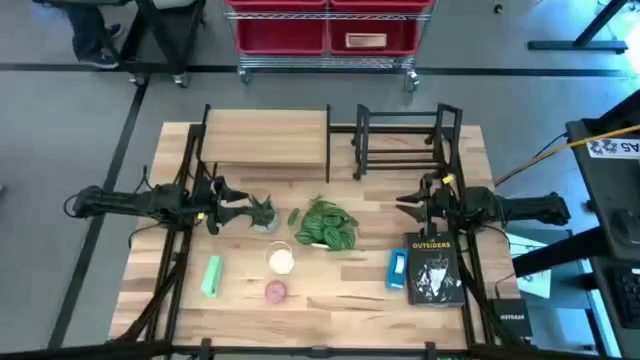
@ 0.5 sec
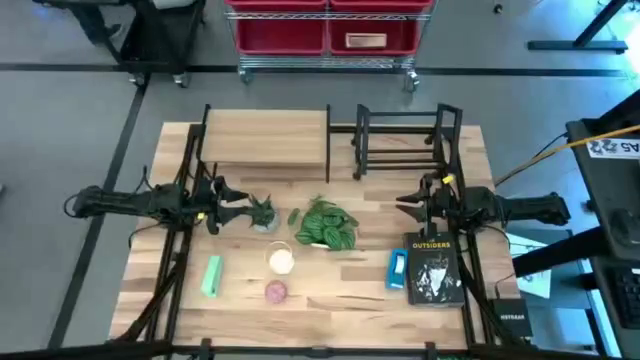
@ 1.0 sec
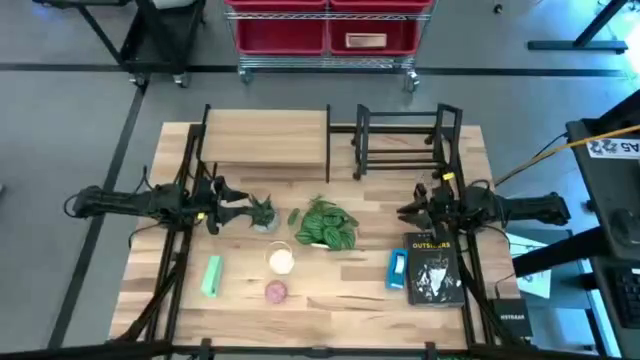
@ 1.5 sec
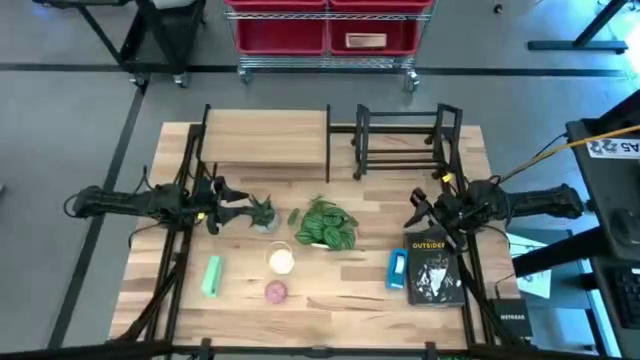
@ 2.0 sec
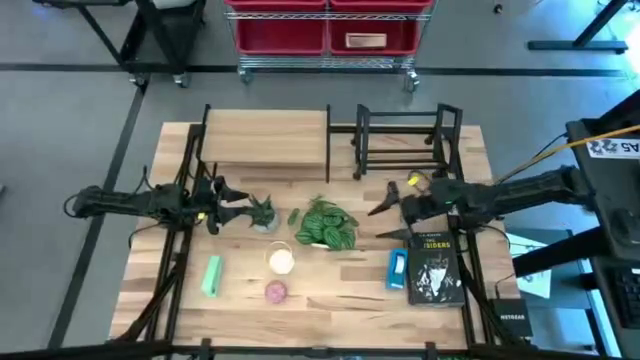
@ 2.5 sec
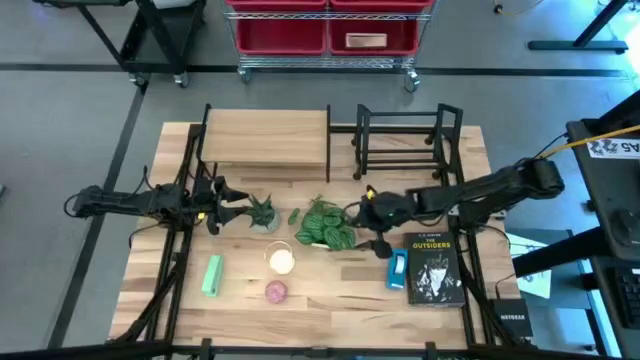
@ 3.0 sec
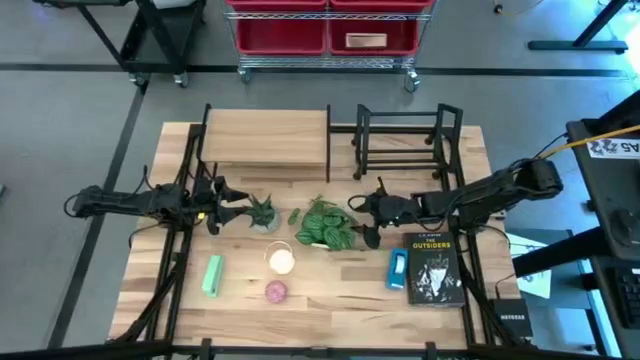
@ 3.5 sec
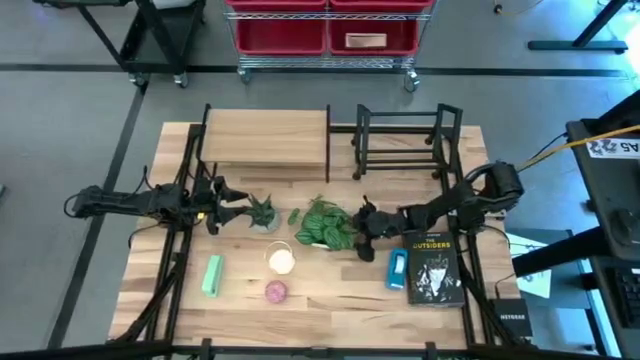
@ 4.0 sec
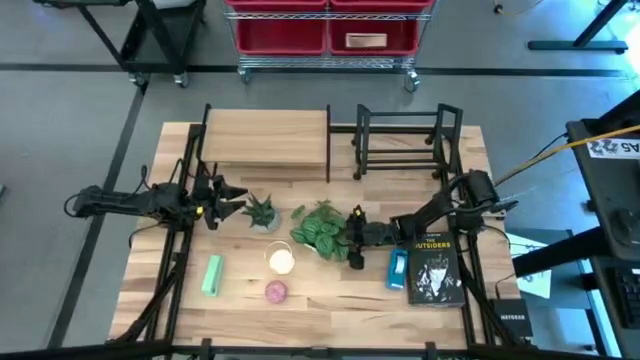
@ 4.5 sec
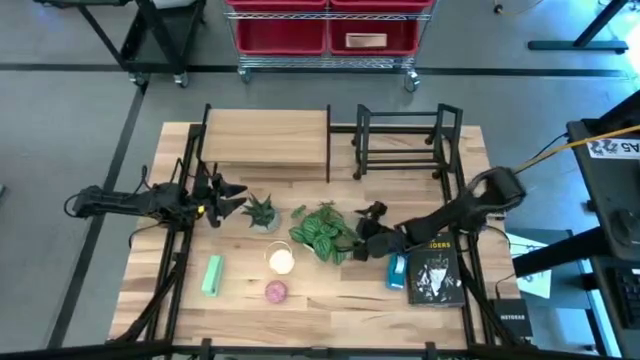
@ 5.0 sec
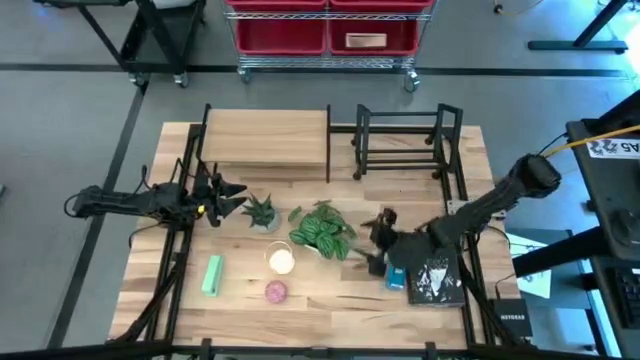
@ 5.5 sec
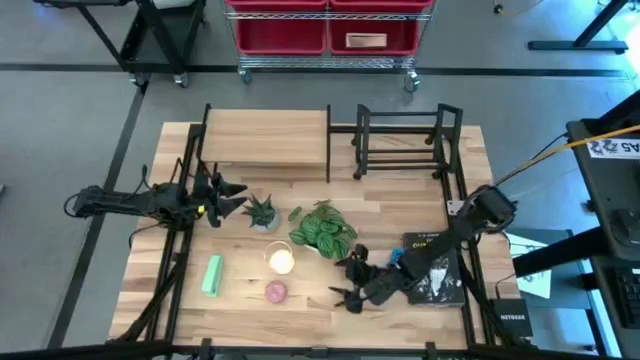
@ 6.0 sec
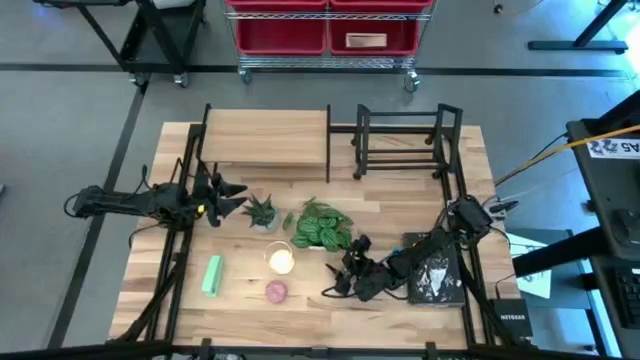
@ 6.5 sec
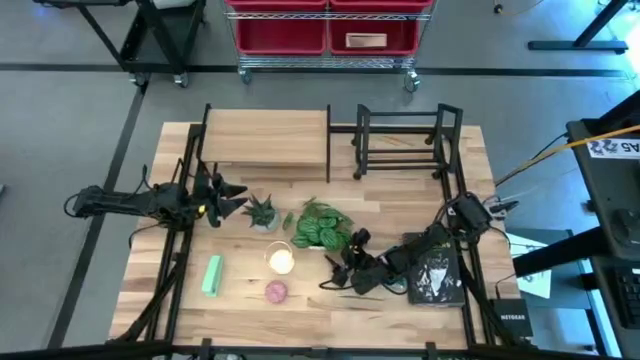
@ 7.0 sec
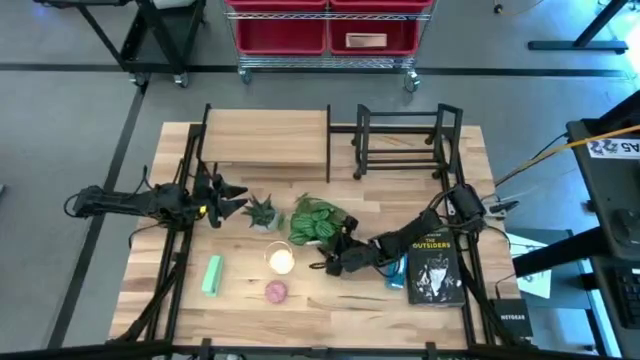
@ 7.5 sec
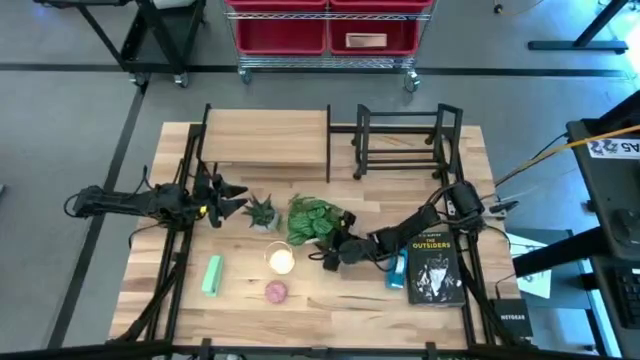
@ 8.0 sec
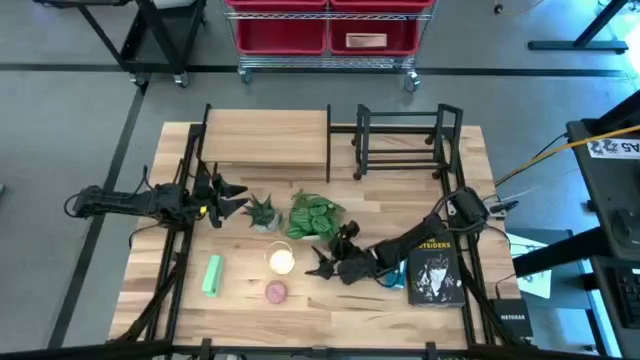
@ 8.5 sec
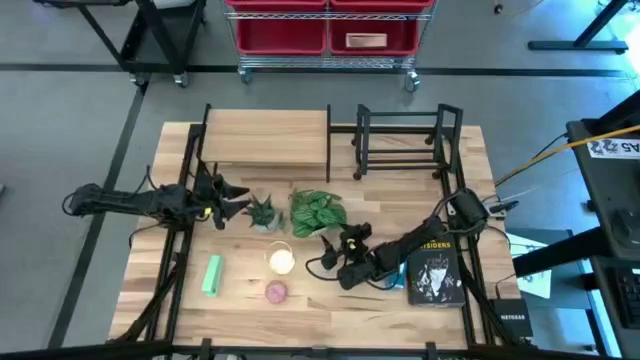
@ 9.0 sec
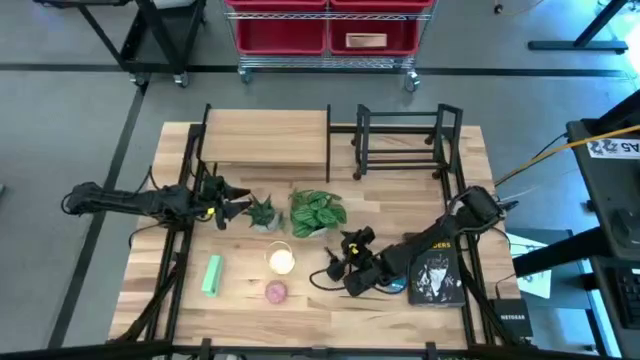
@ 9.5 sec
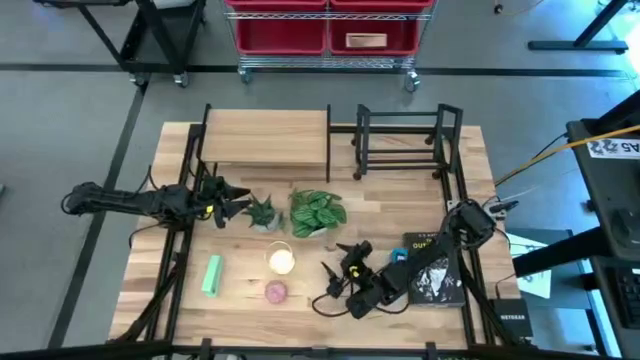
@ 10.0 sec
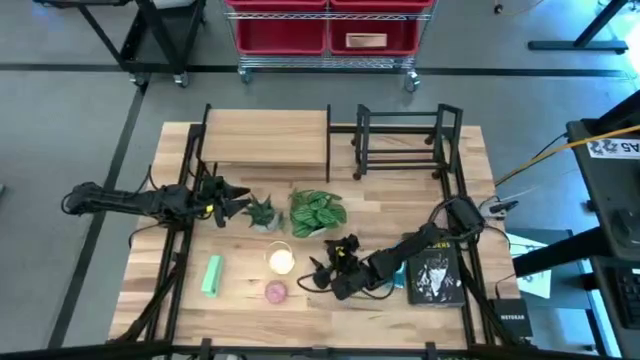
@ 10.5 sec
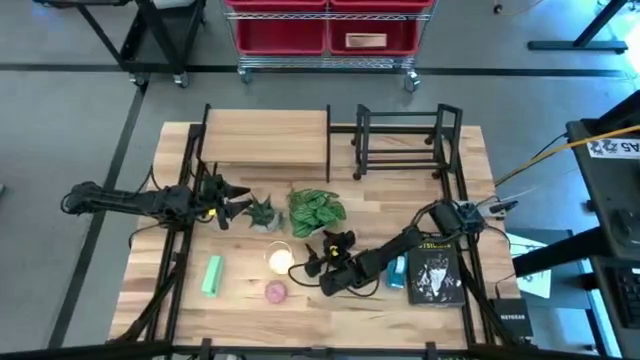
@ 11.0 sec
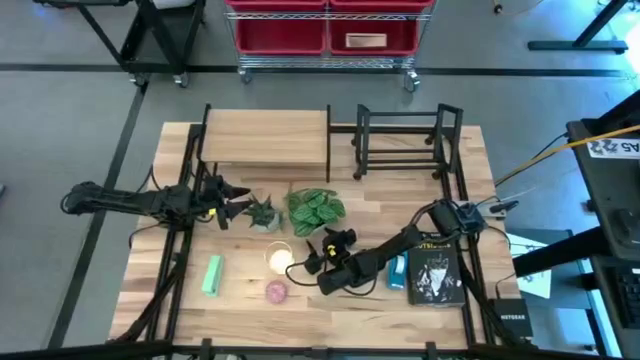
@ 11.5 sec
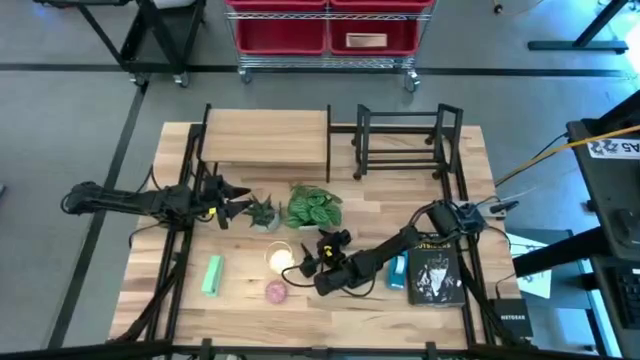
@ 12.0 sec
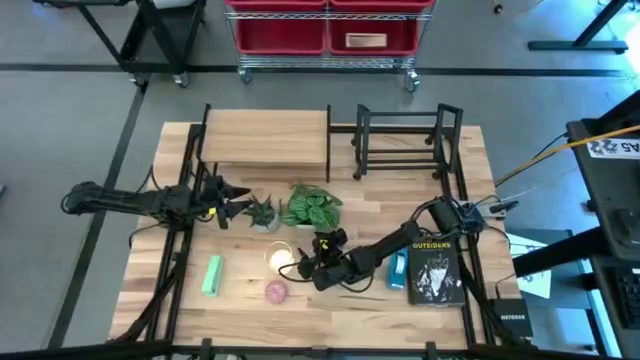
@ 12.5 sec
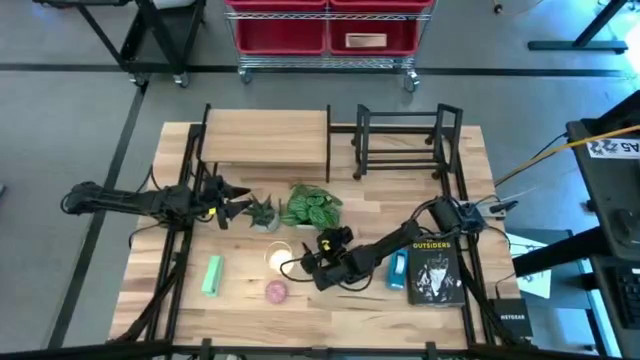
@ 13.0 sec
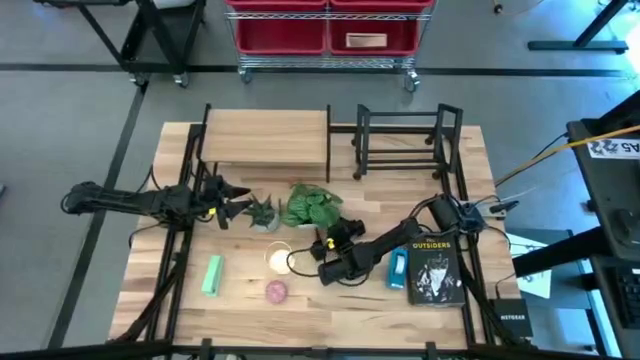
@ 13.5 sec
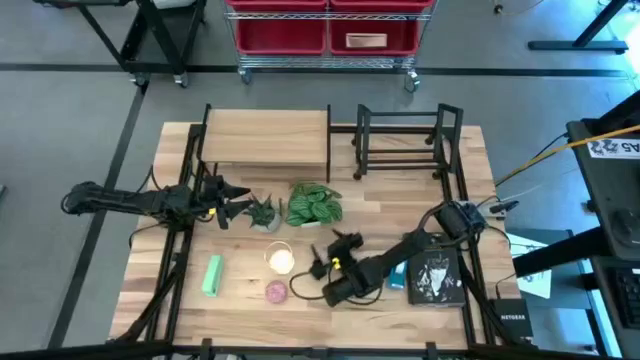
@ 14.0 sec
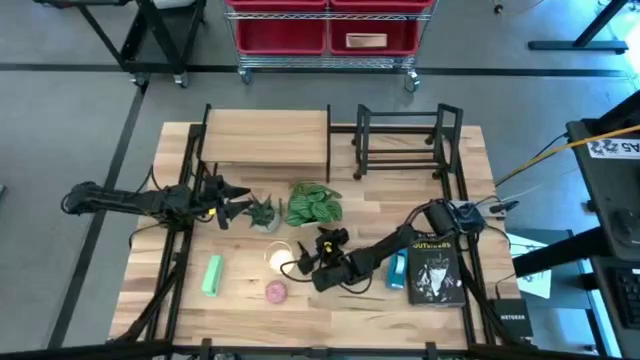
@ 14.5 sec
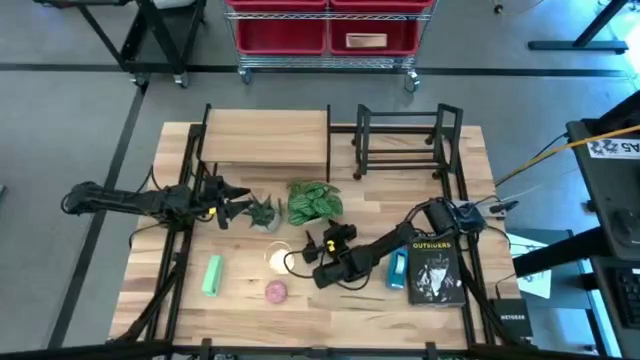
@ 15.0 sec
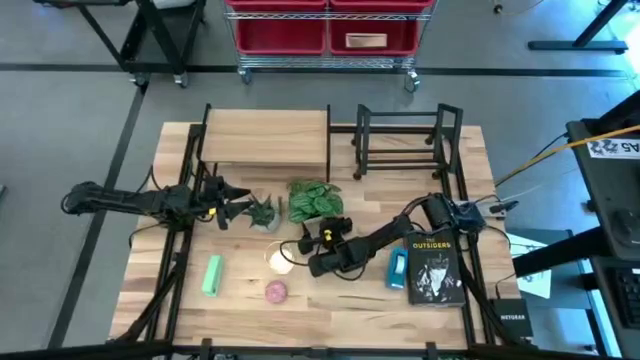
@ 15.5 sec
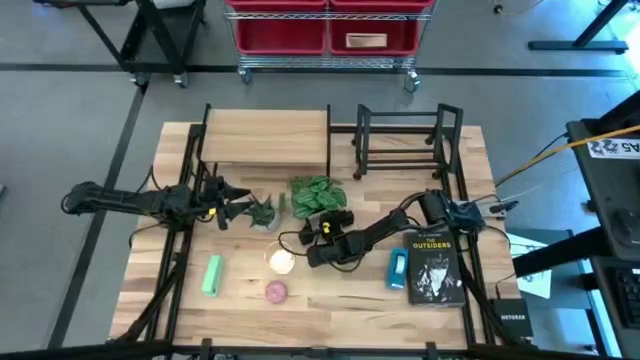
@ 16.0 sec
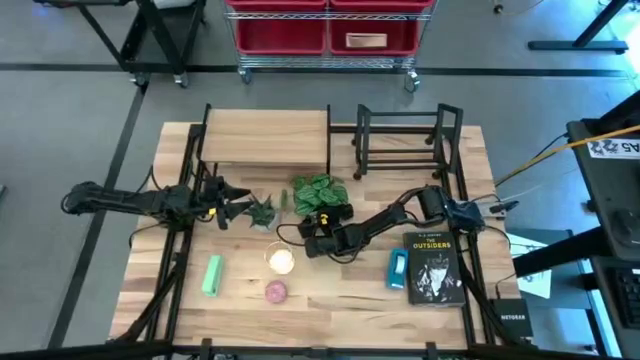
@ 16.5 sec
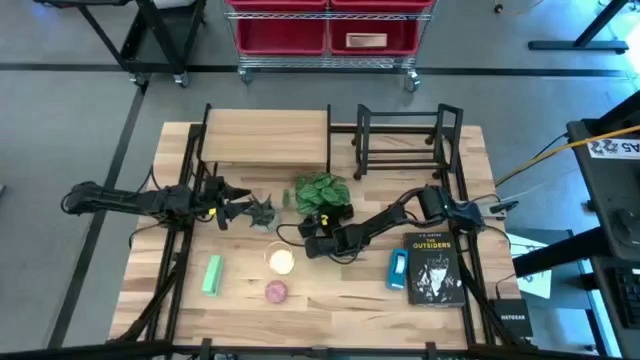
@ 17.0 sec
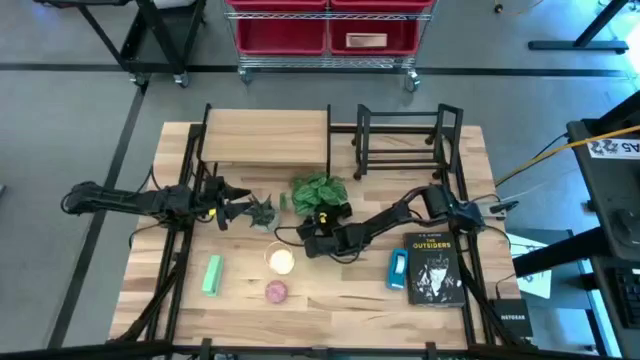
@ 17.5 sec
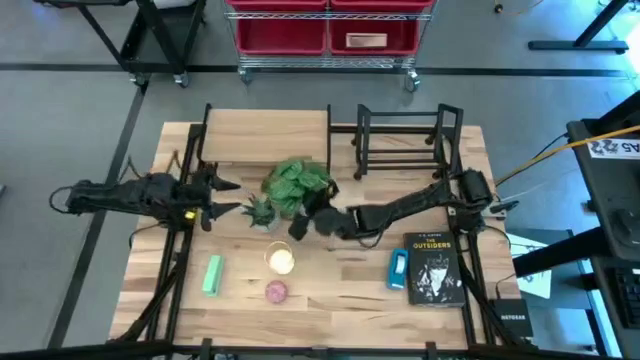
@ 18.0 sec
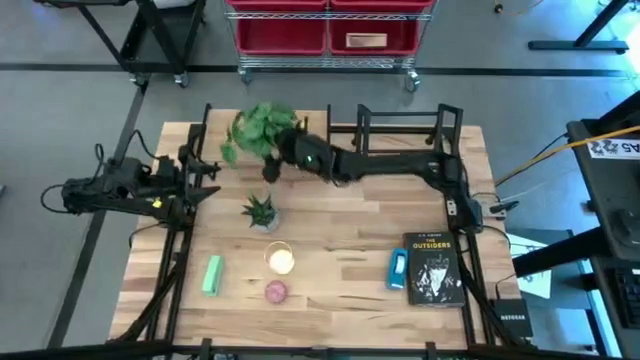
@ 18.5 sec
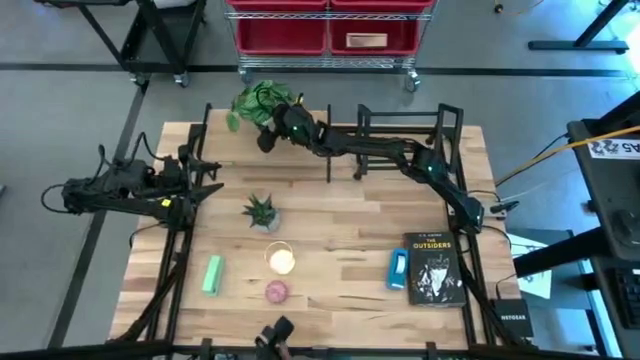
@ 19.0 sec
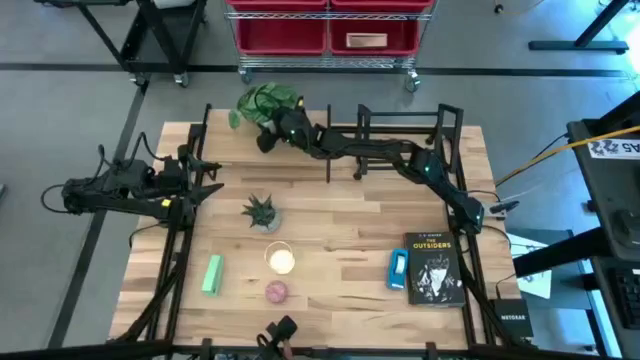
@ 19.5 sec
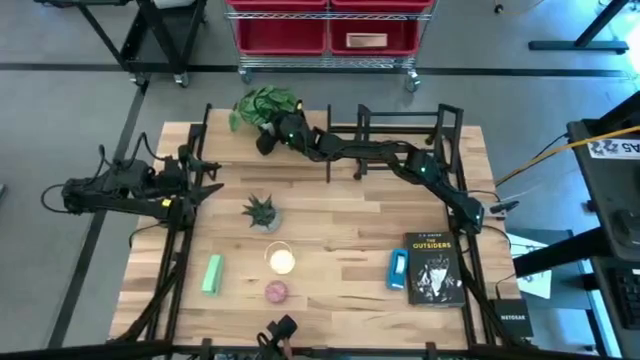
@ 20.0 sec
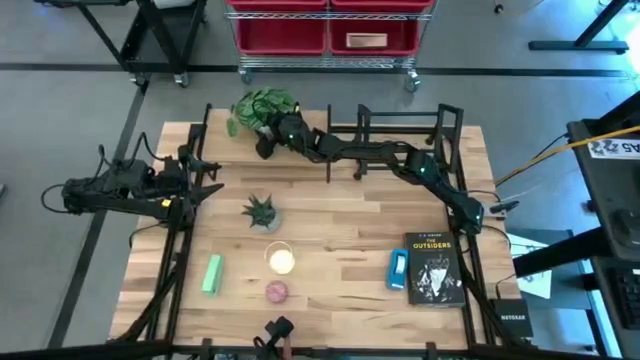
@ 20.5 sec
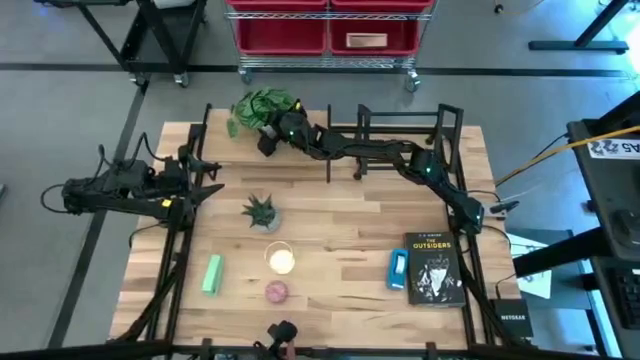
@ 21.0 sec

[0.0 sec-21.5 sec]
Task: Stock shelves
Put the white plotted plant on the shelf
